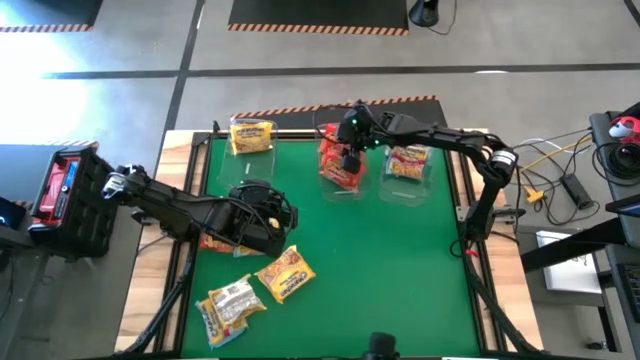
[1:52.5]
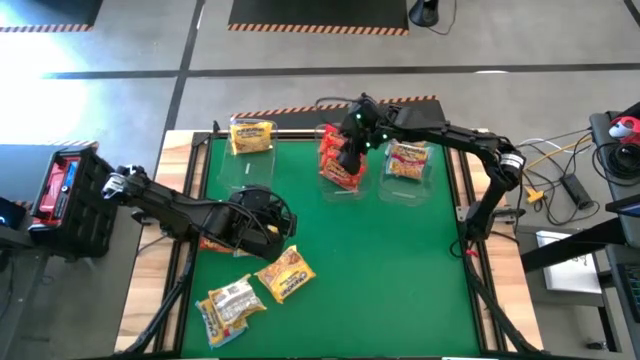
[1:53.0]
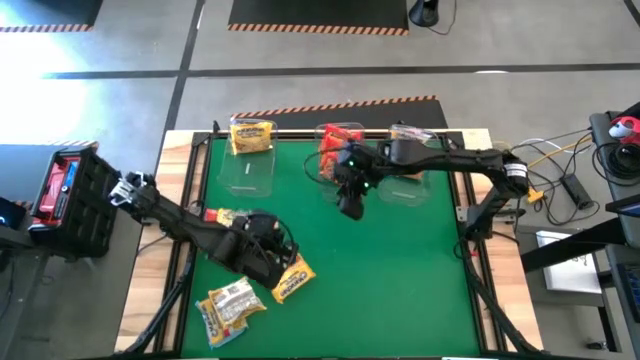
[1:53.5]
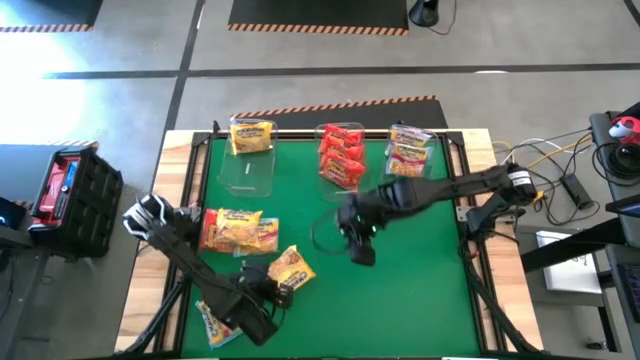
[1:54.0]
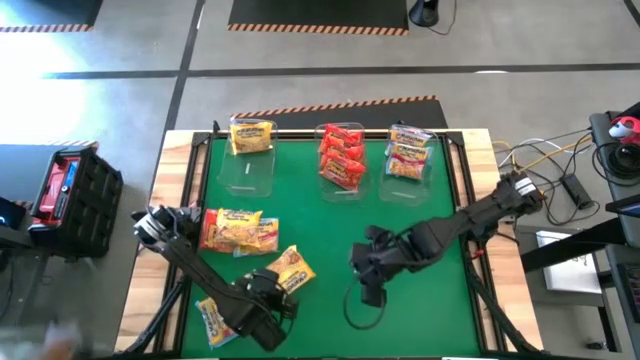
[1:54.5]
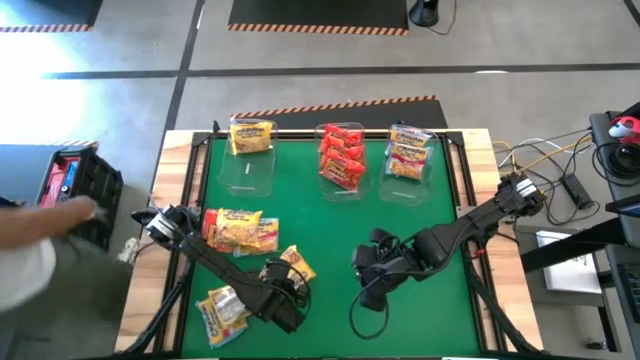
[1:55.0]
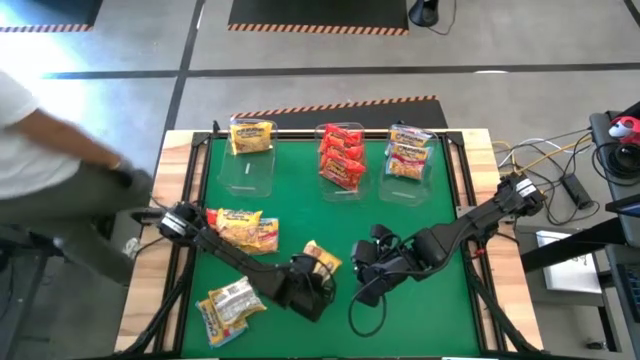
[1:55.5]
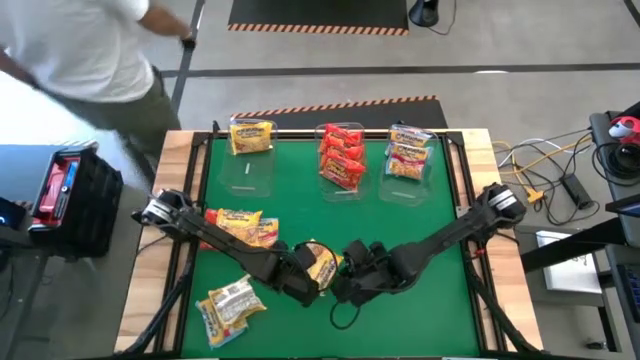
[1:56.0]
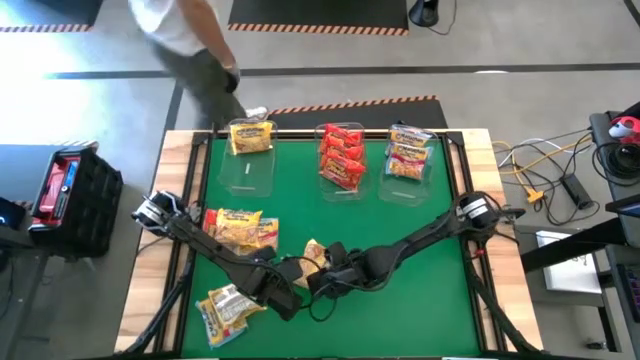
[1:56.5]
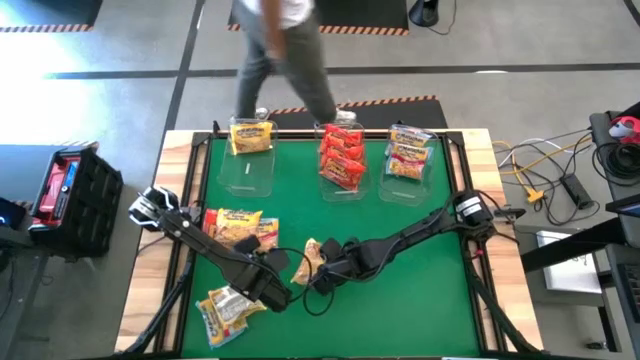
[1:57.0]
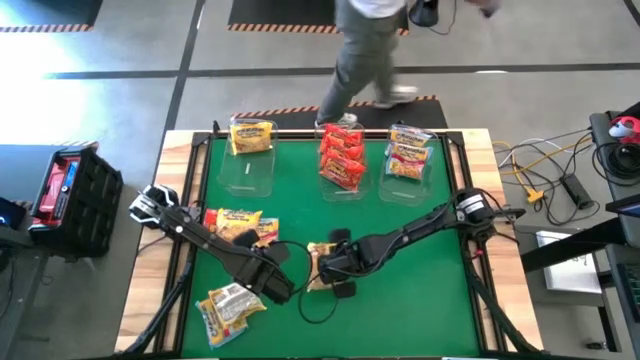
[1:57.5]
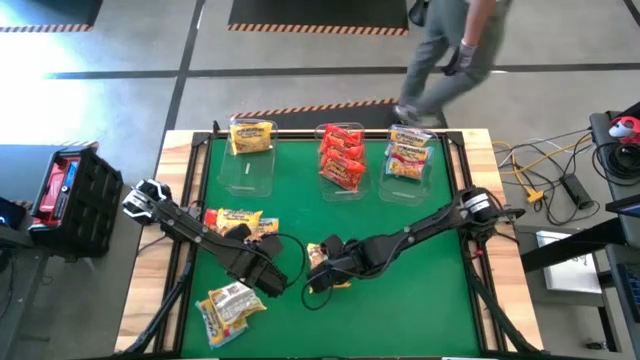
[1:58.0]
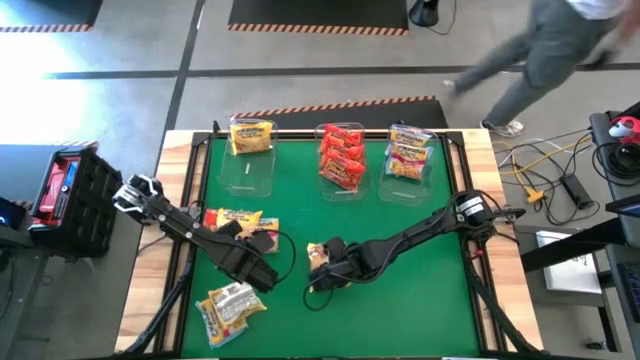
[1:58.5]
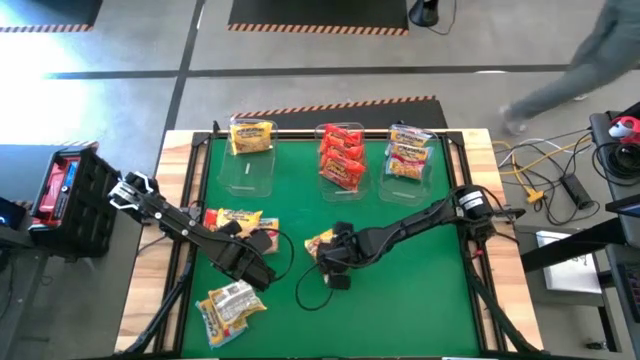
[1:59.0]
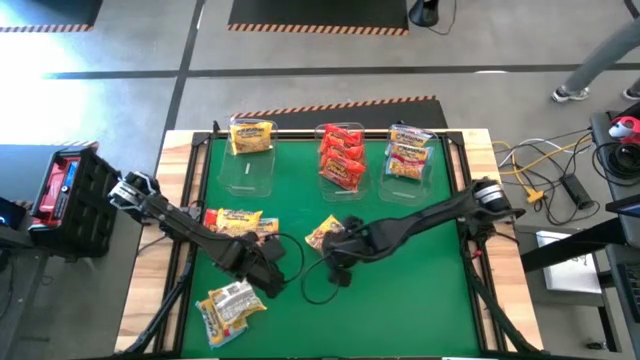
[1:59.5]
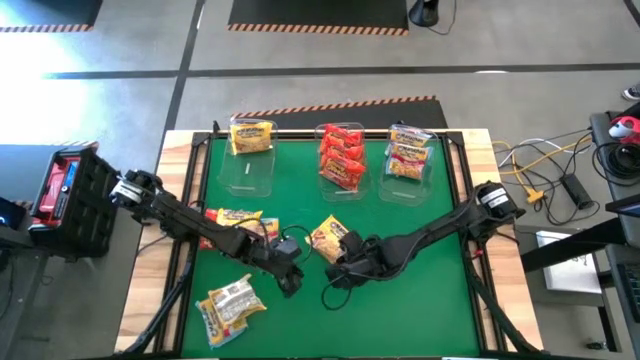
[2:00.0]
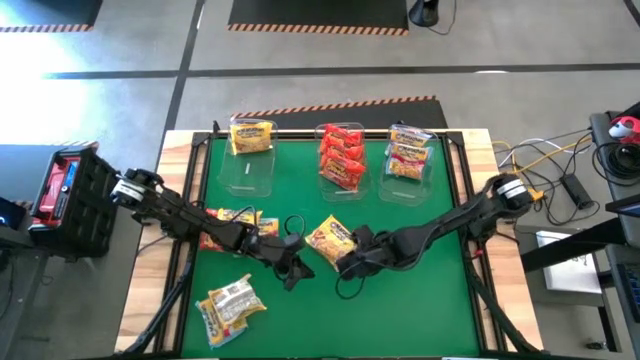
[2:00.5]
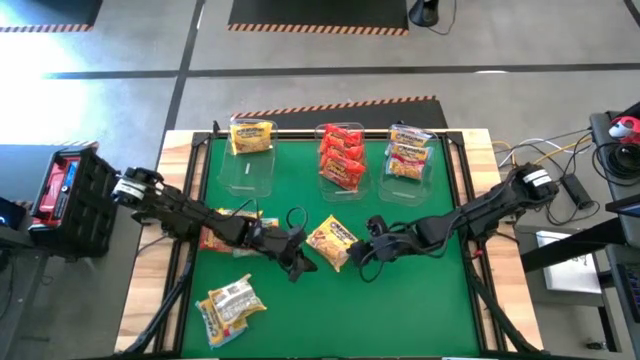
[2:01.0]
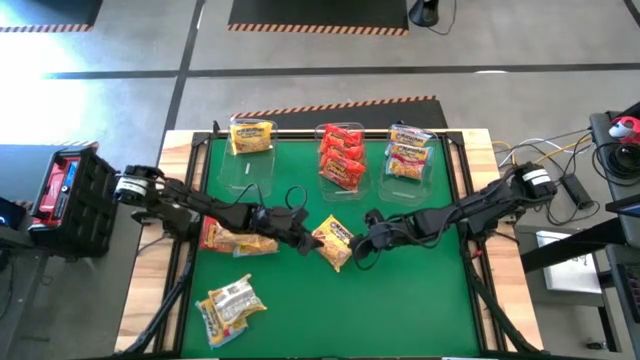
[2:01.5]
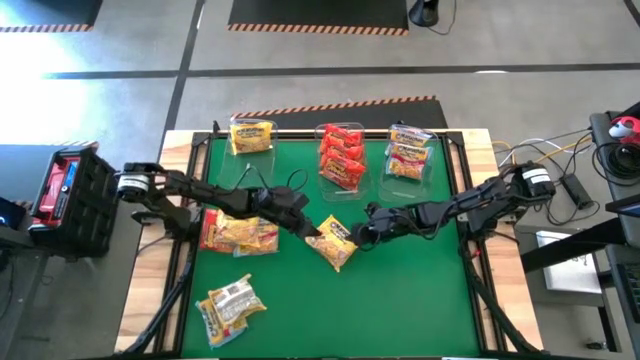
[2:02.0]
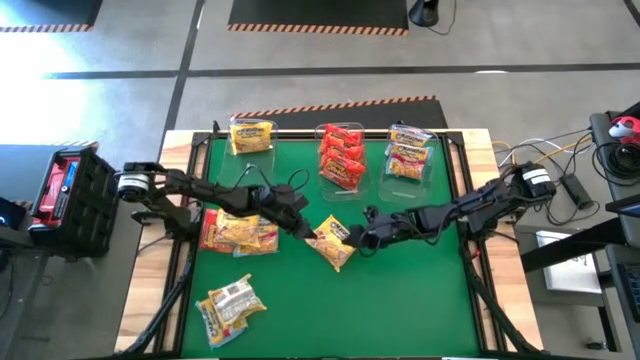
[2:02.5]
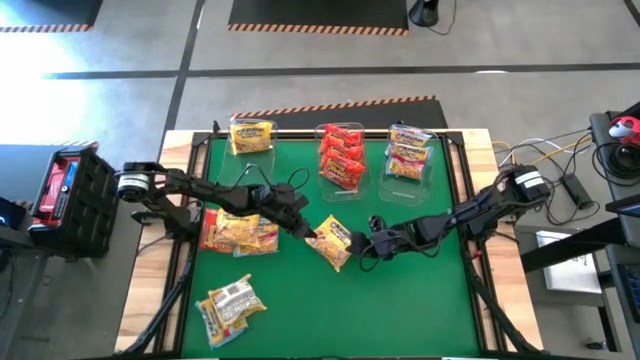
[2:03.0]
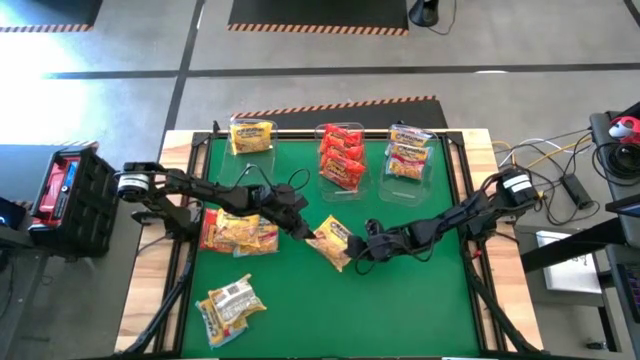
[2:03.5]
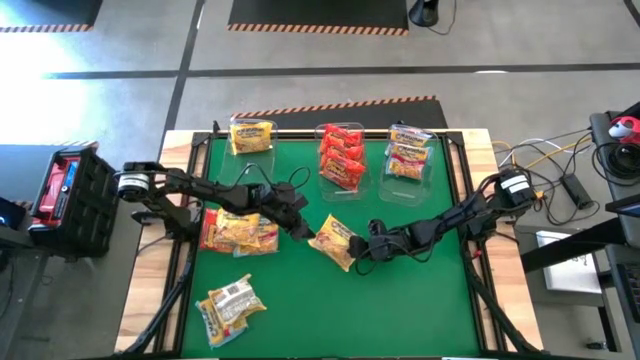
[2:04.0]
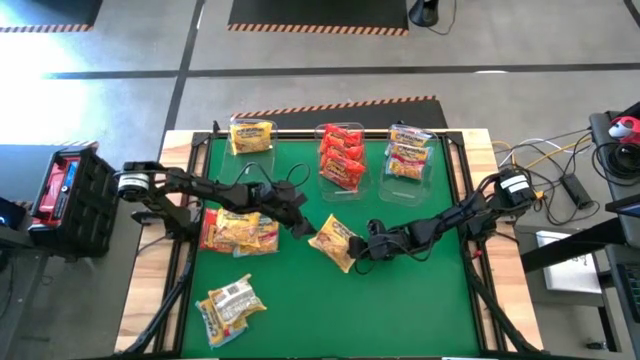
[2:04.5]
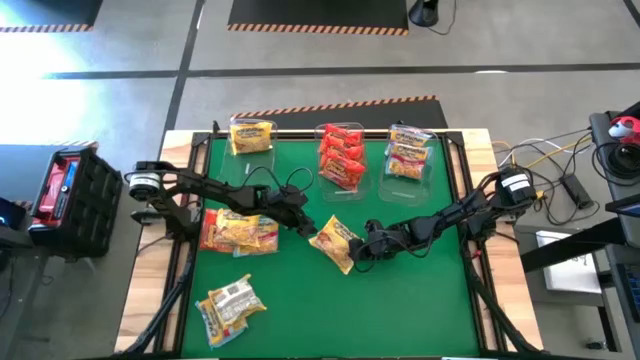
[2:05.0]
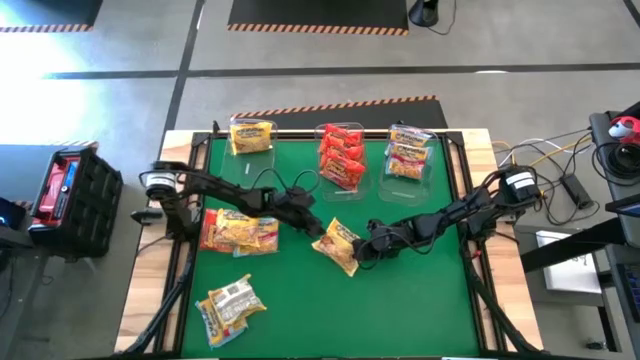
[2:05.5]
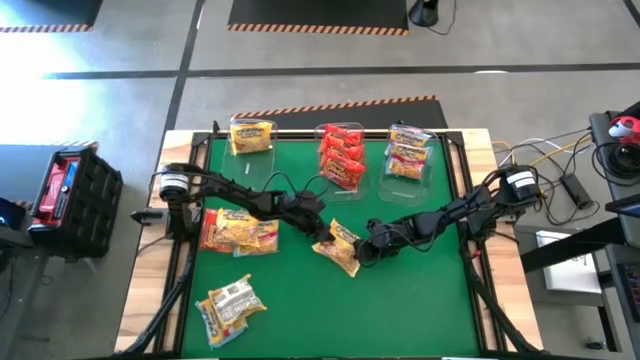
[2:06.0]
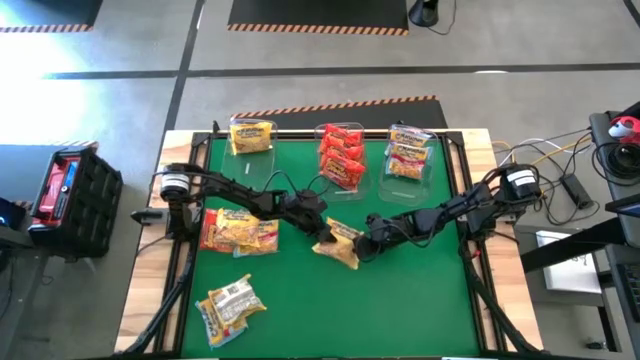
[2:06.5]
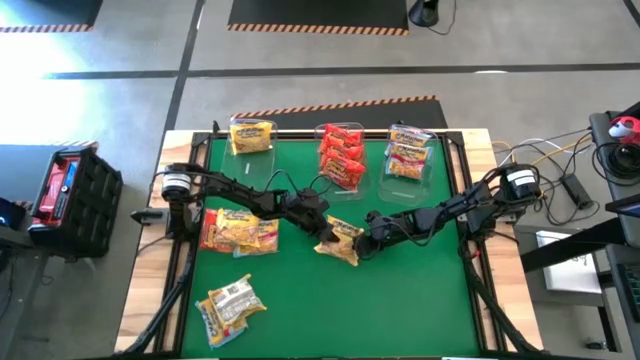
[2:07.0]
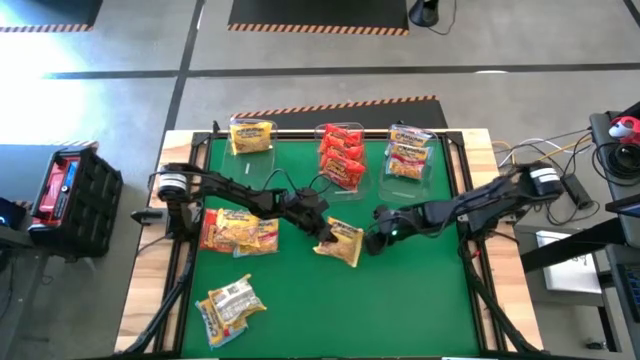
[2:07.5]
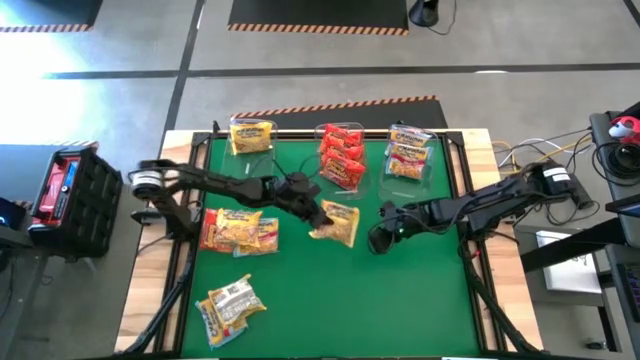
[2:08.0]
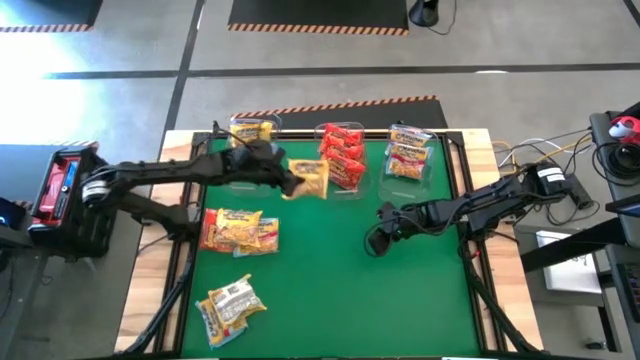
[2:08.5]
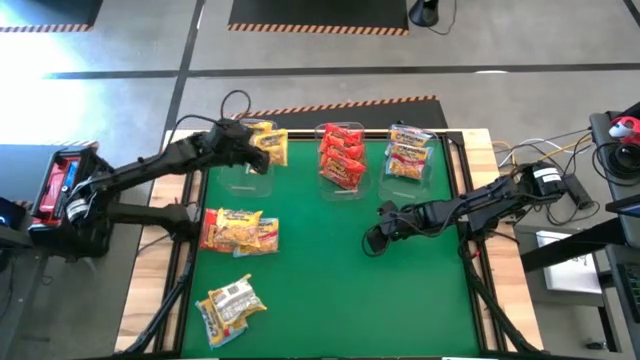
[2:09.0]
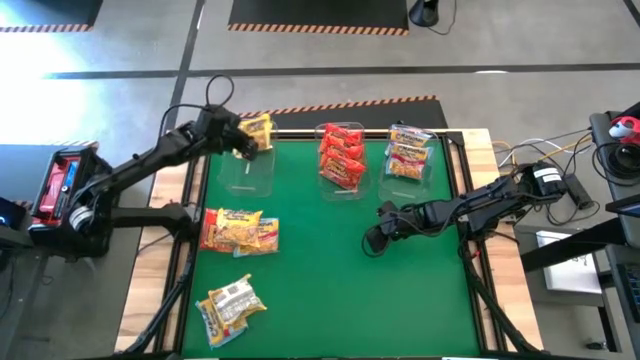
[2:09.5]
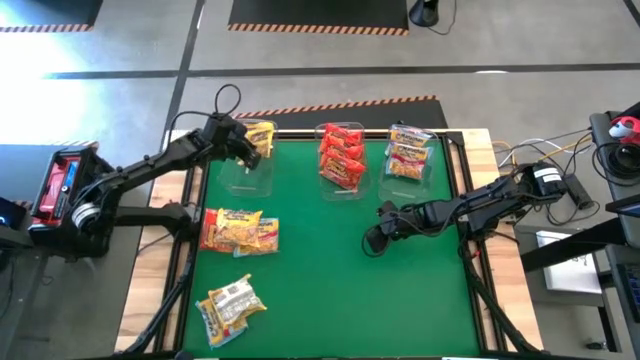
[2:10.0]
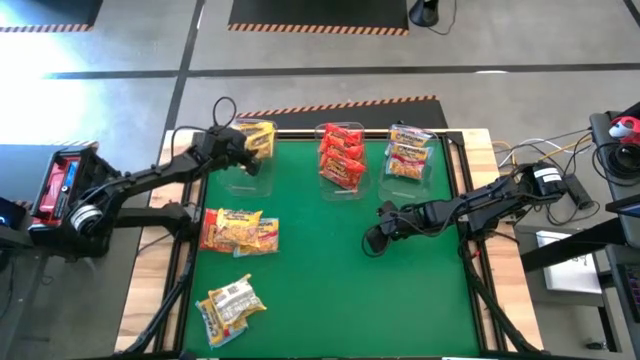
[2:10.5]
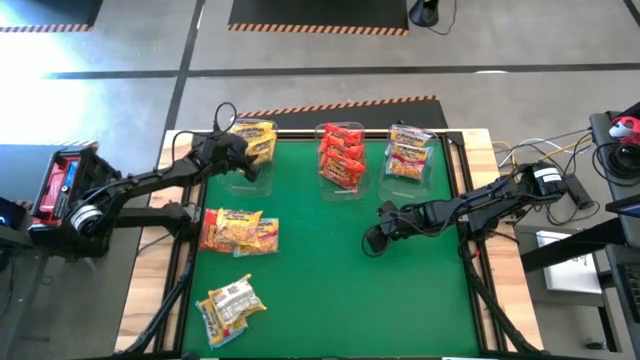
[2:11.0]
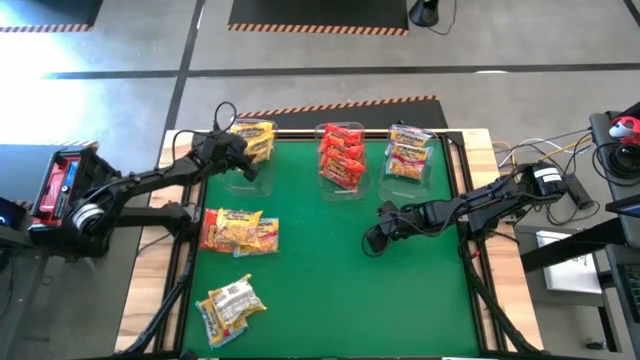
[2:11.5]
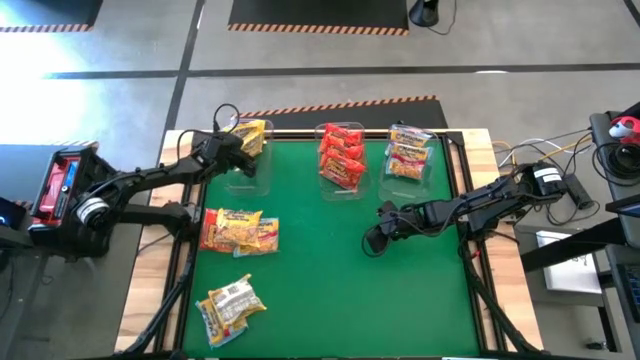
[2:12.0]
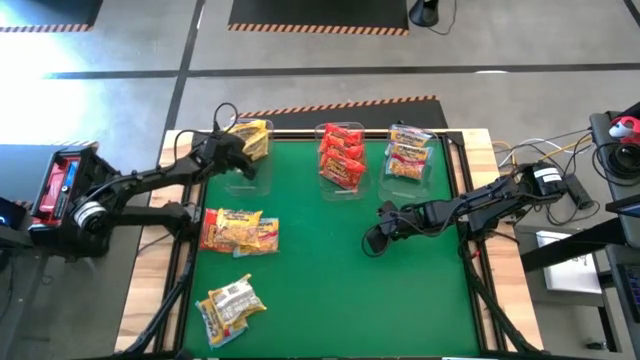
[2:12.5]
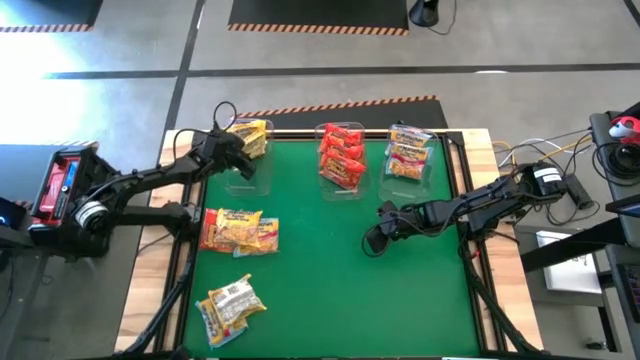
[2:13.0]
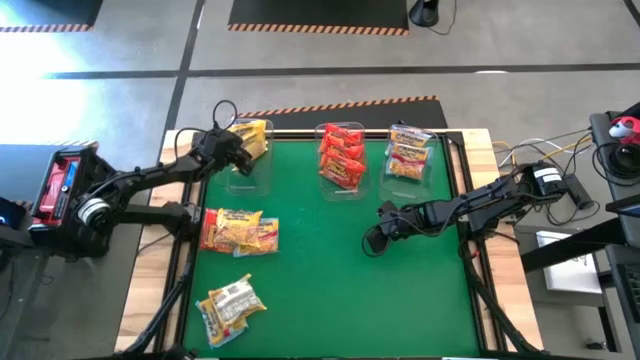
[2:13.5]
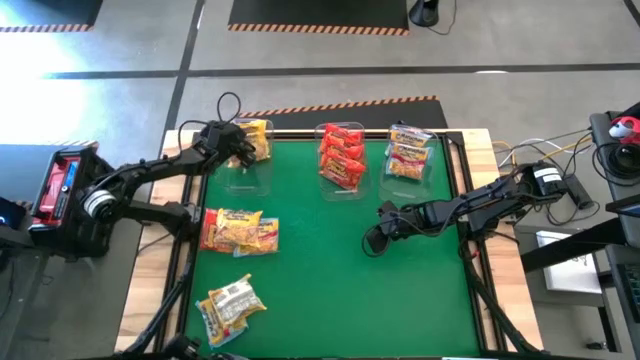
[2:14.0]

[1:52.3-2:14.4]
Task: Sort Maruchan noodles
Put the yellow noodle pack into the left transparent bin
